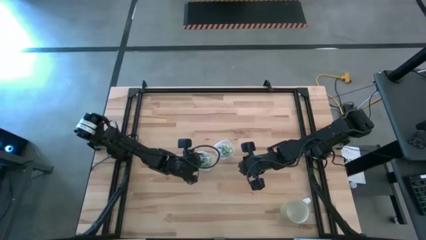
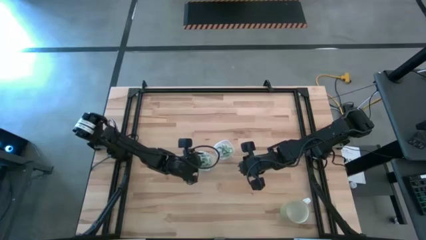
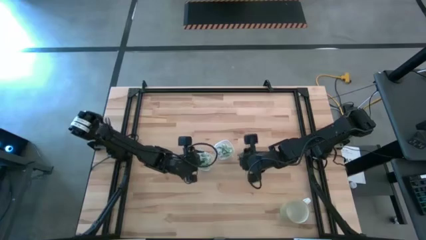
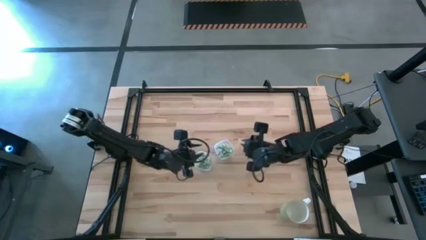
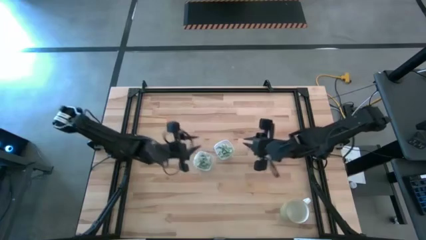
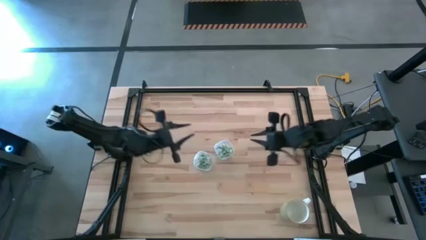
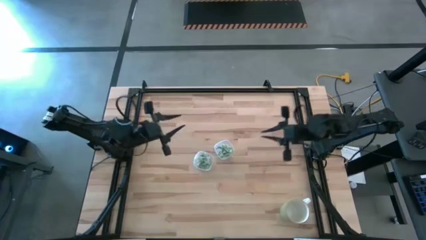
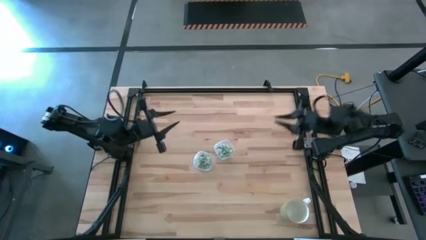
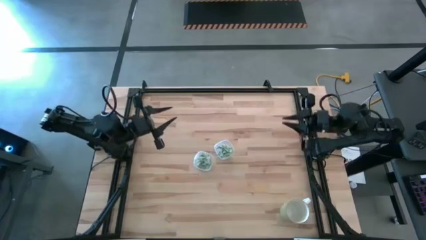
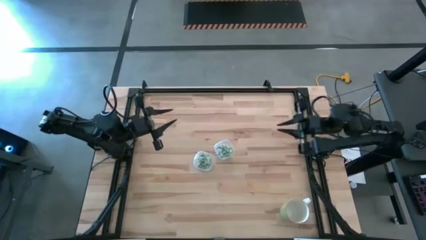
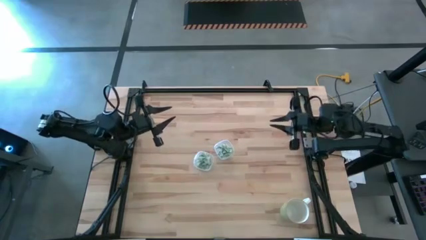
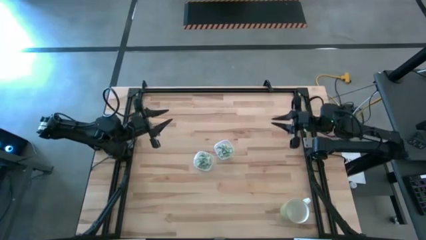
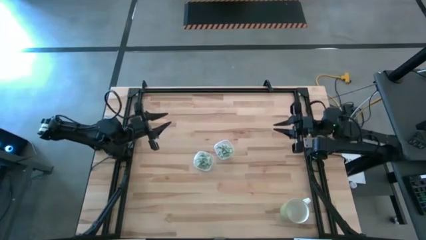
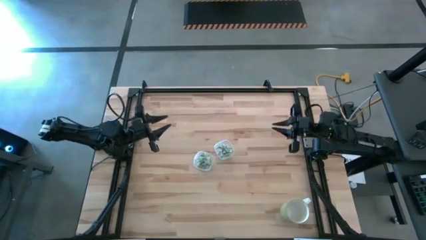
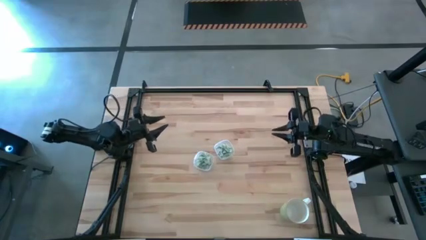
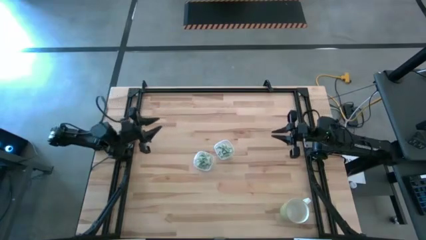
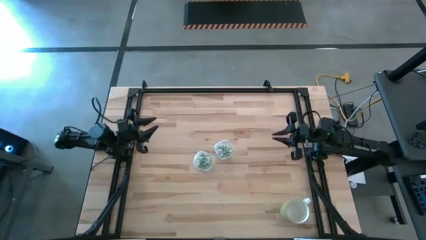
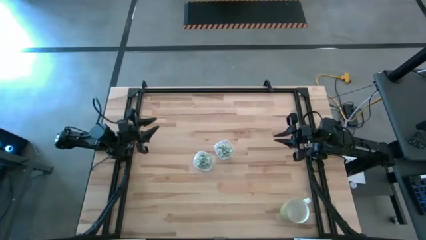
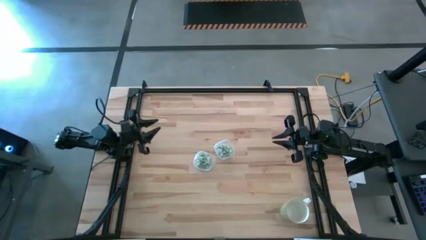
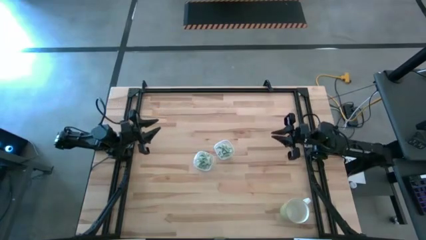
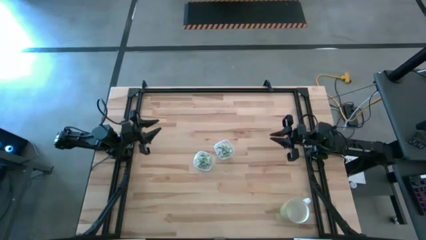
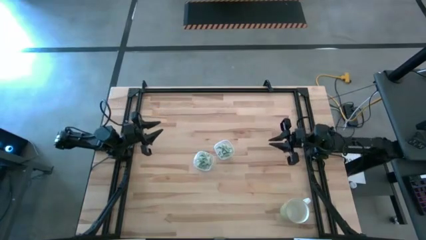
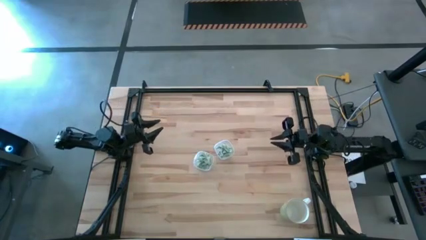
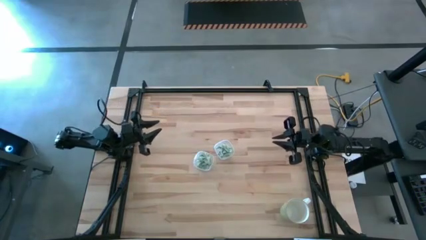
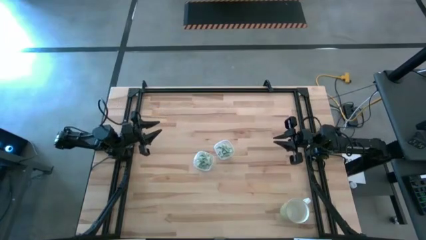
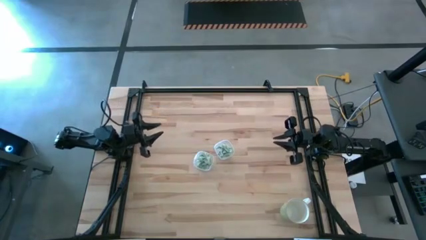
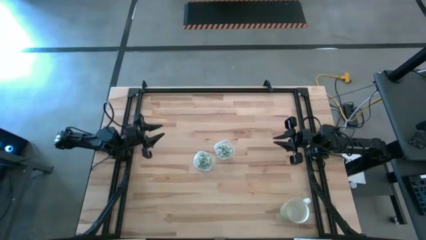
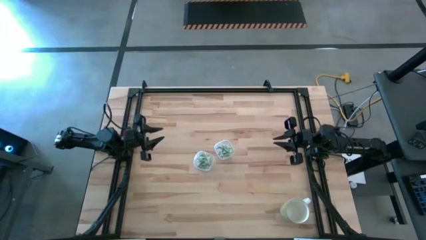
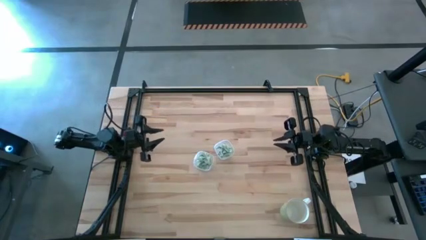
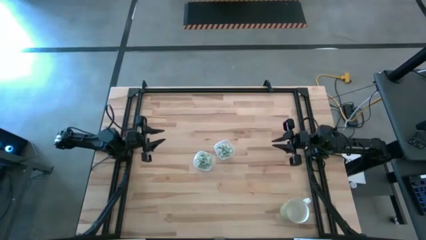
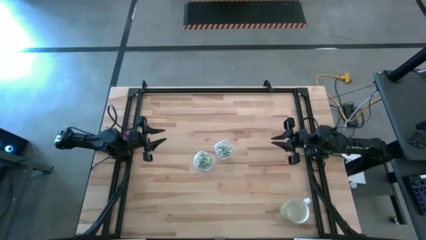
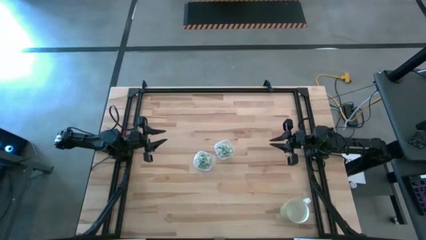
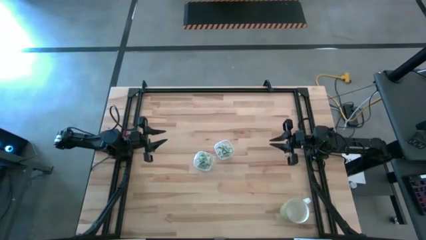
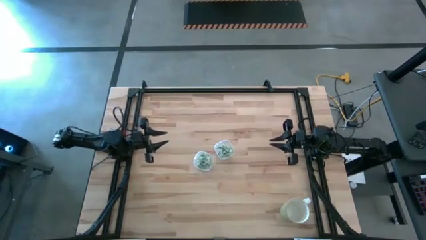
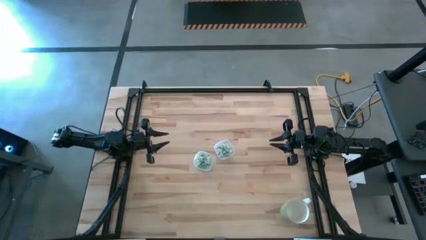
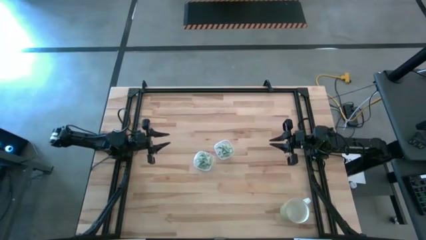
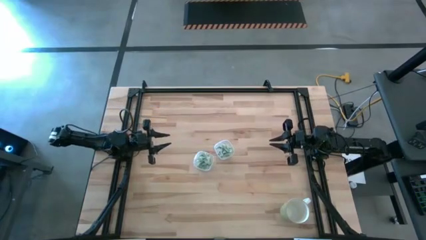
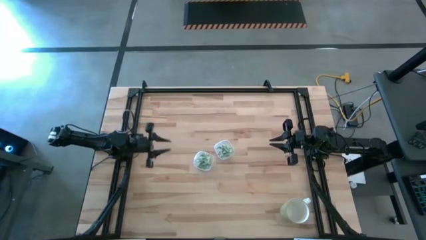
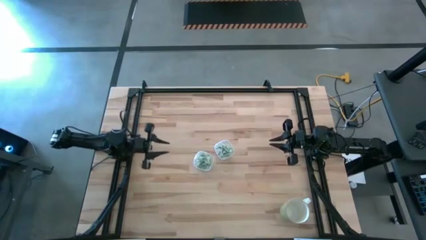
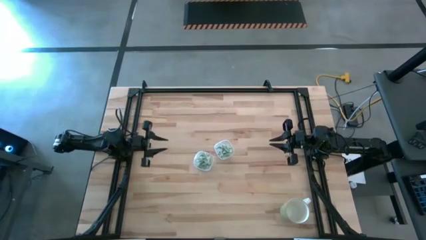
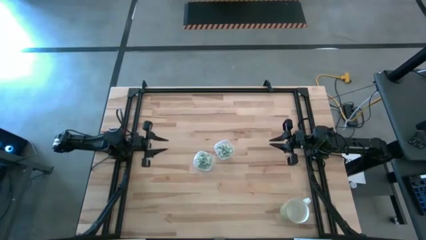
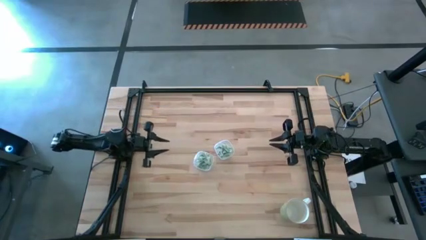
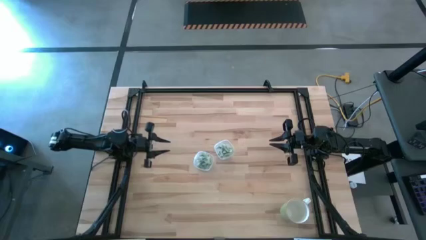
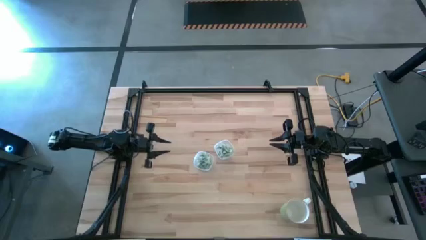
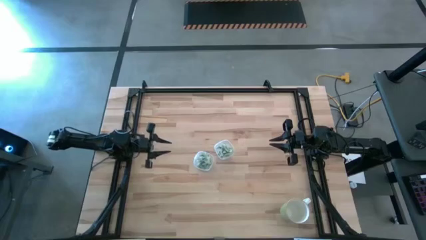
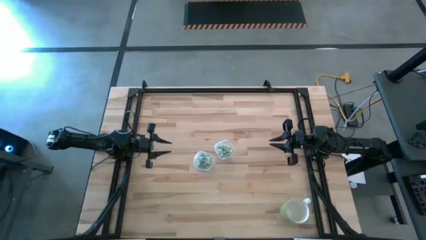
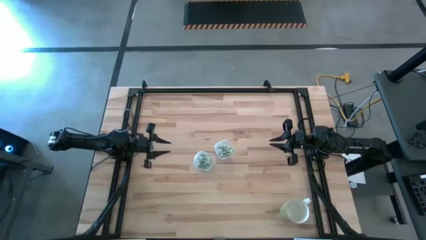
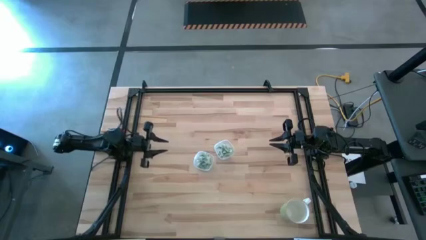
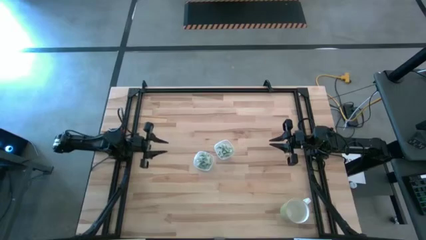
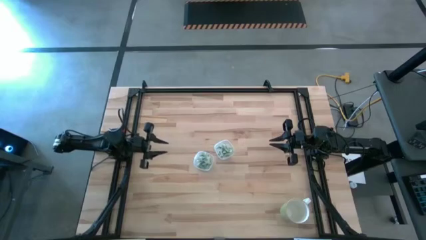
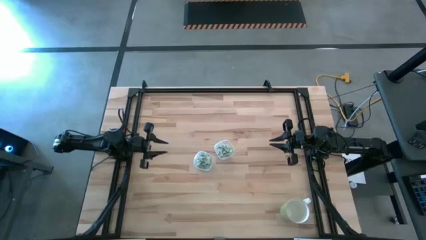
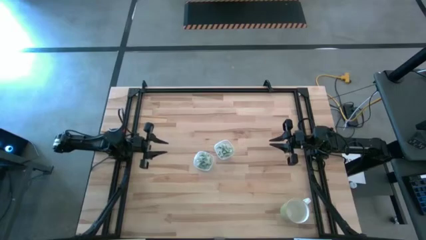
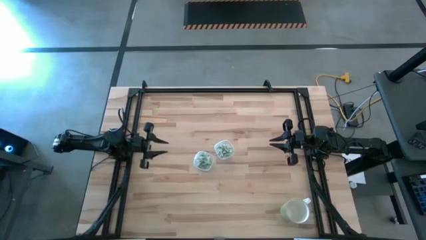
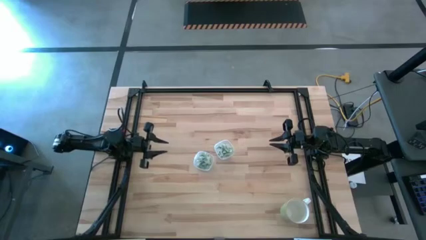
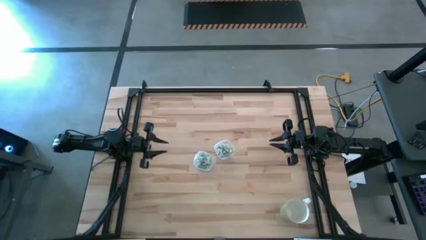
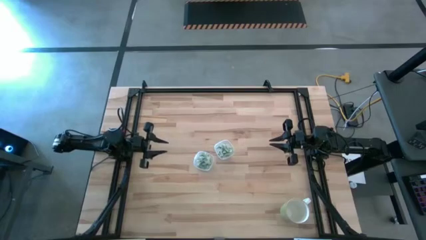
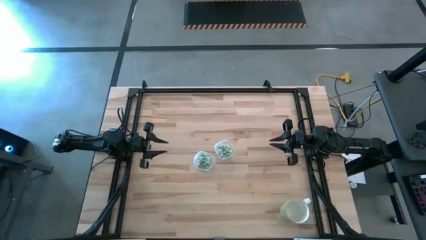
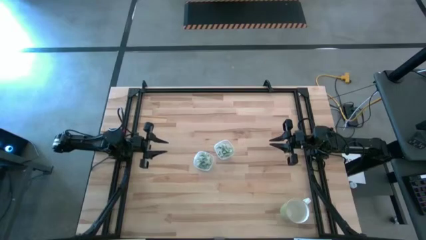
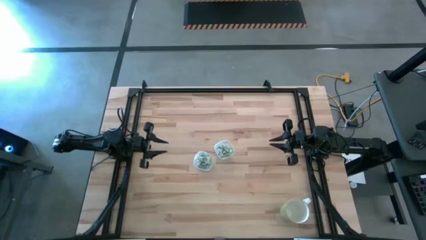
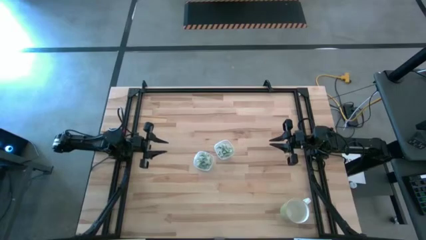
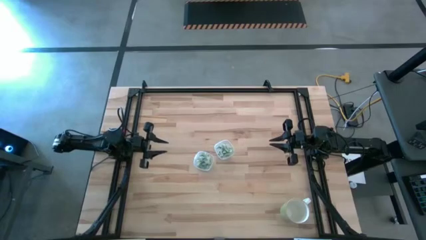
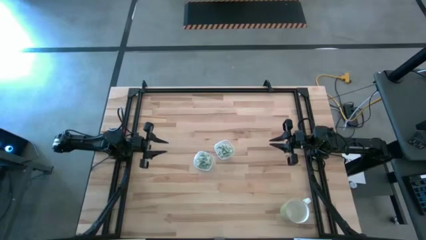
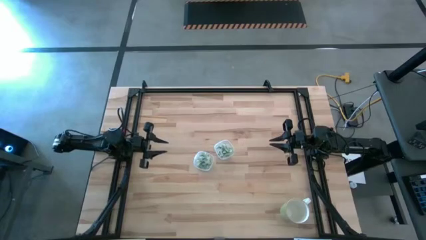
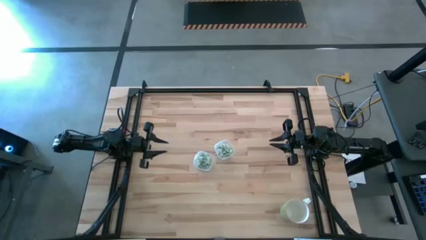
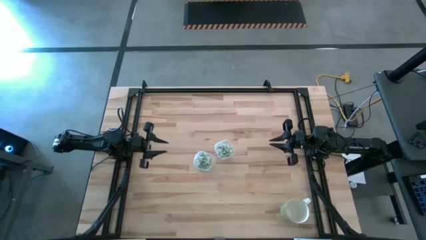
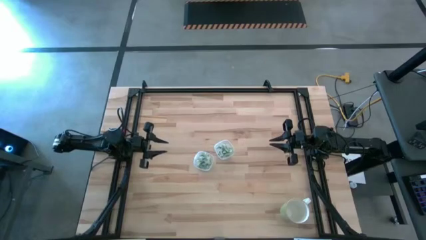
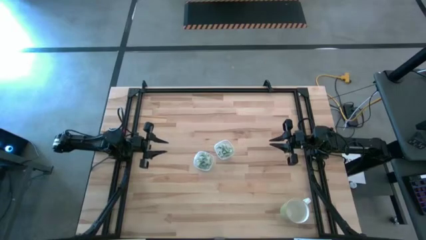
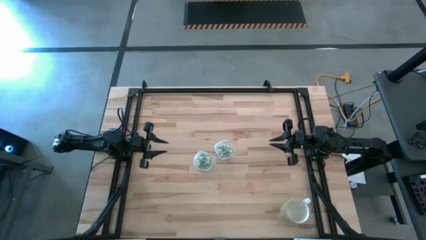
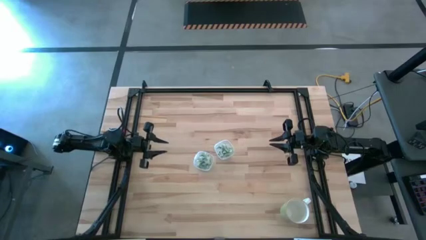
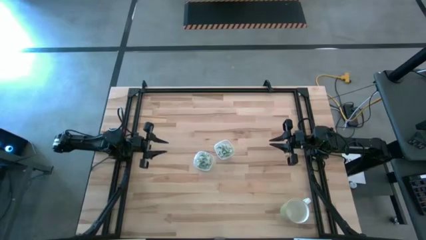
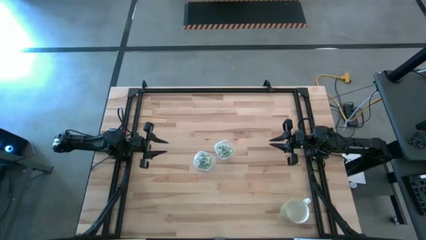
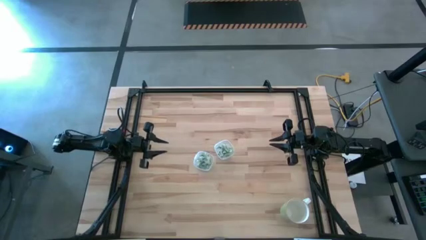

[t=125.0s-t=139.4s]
Task: Pick and place items into bin
Return to Home Position

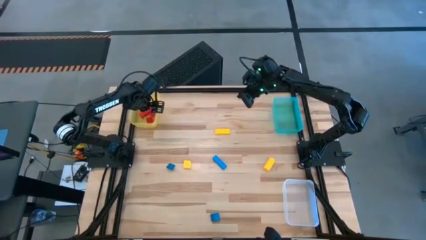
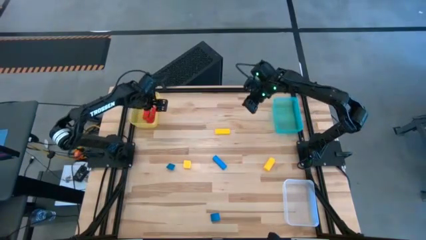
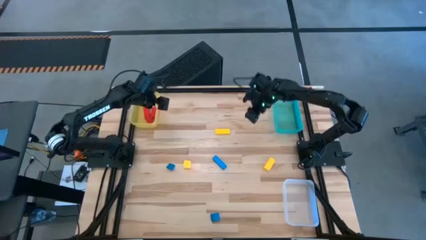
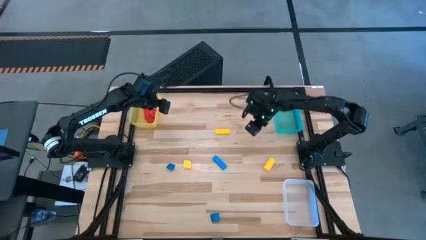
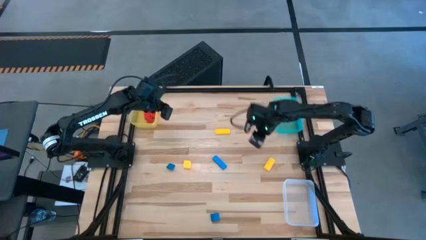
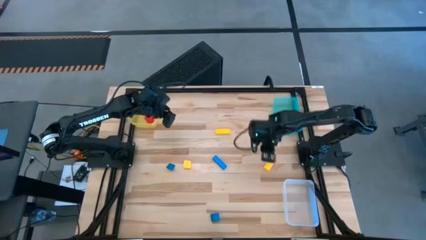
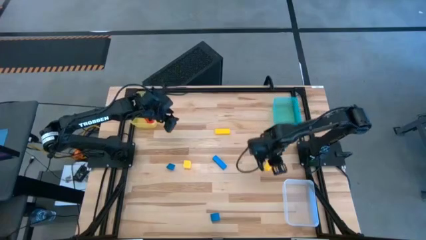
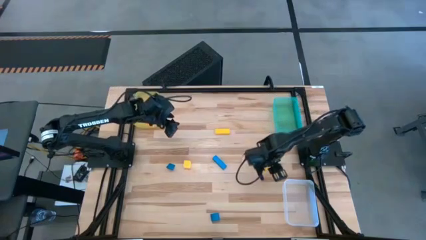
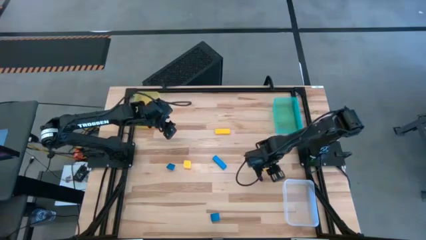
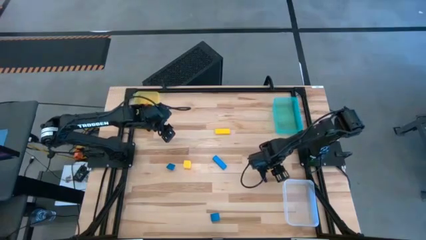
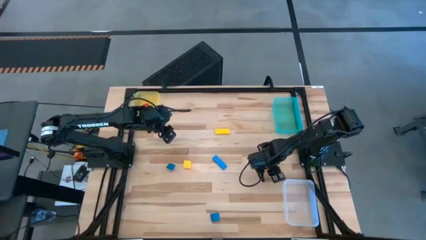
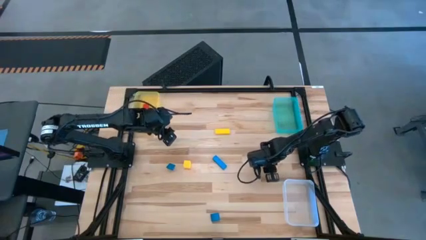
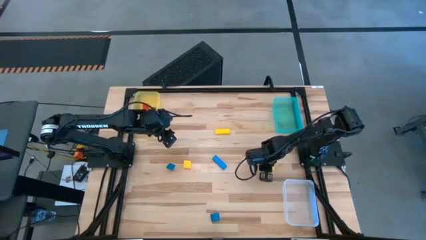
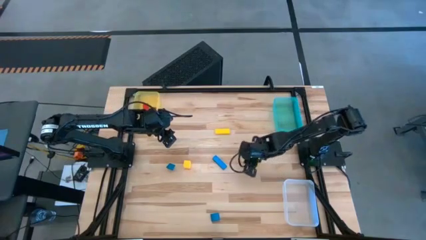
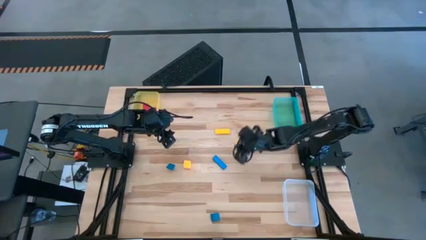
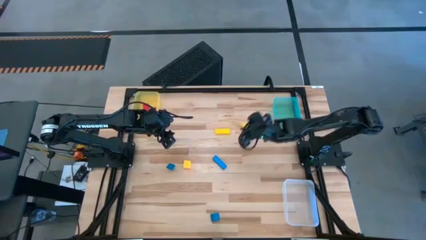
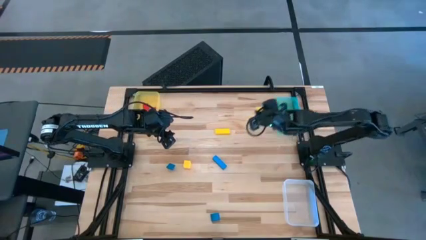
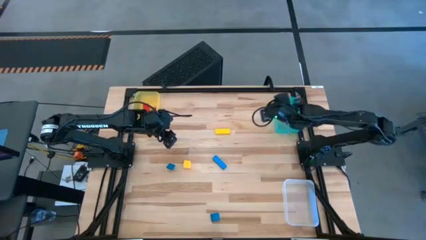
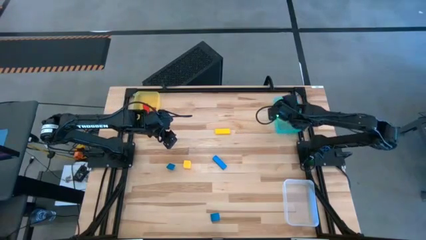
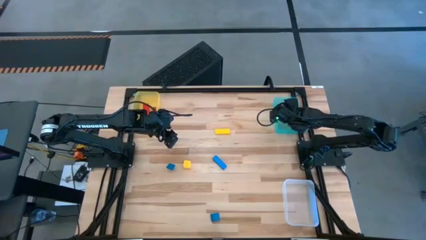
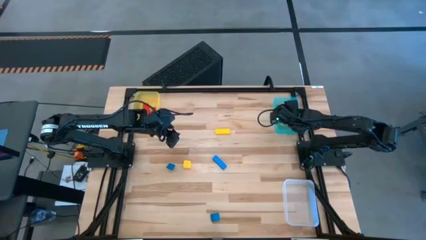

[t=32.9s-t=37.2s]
Task: Sort & place blocks by color
Put the right yellow block into the green bin
